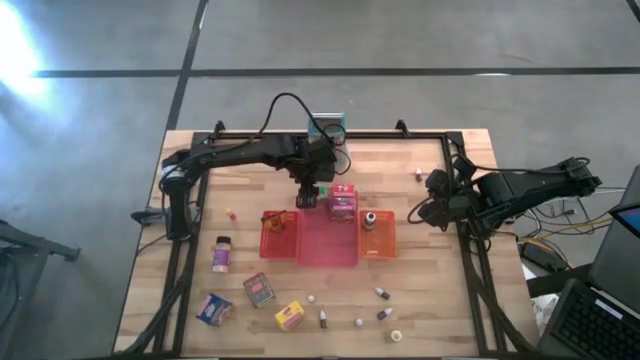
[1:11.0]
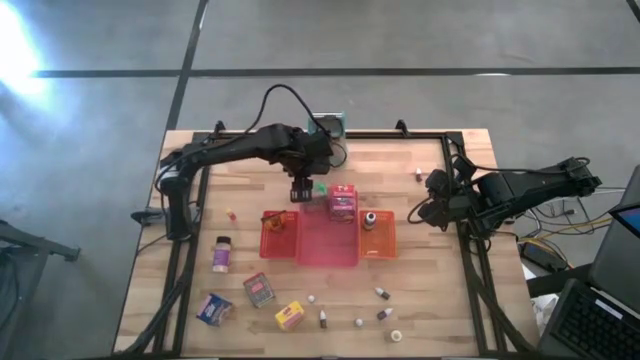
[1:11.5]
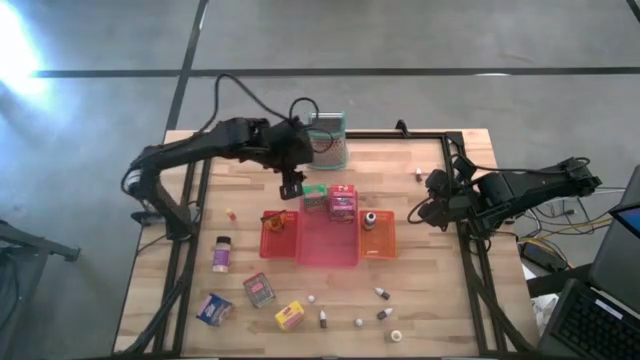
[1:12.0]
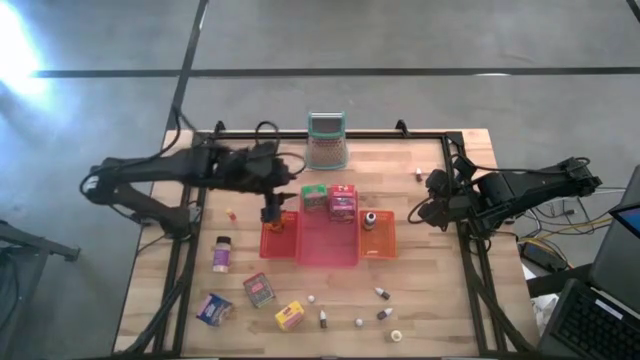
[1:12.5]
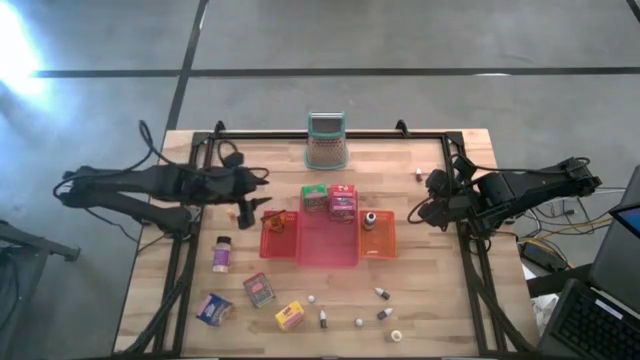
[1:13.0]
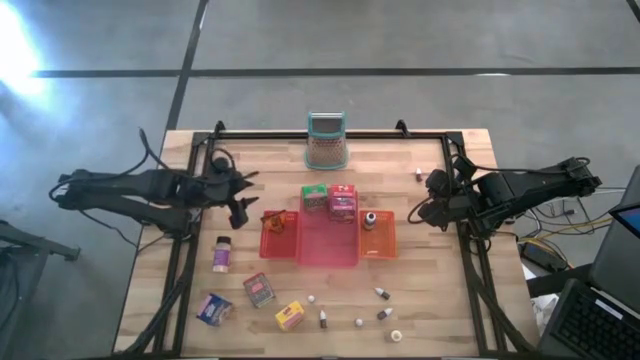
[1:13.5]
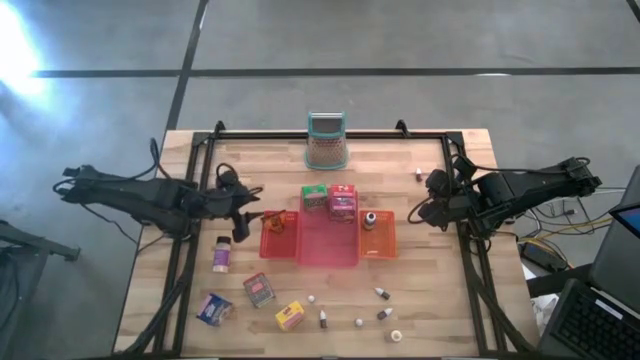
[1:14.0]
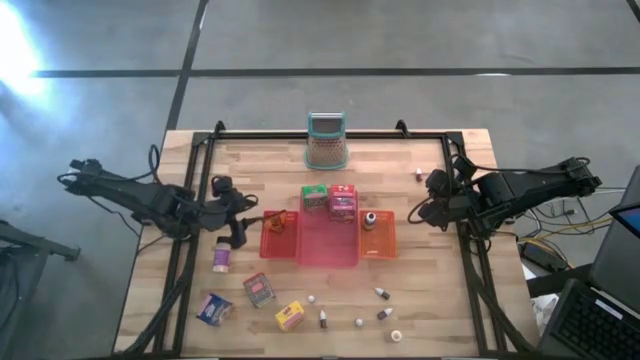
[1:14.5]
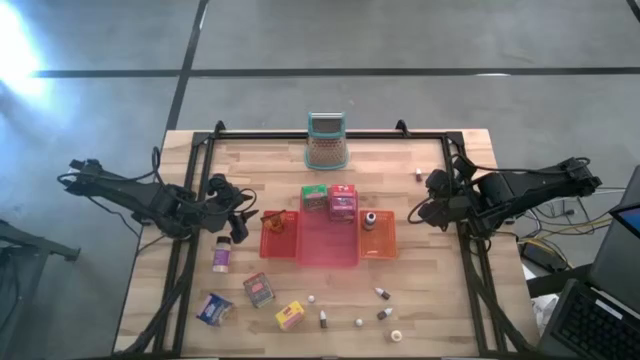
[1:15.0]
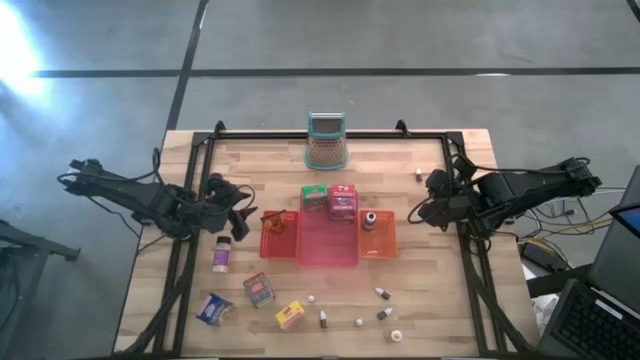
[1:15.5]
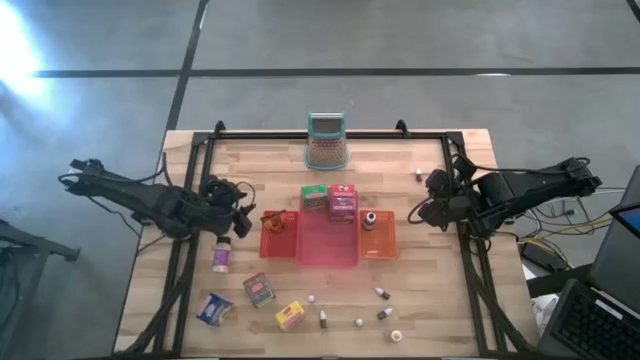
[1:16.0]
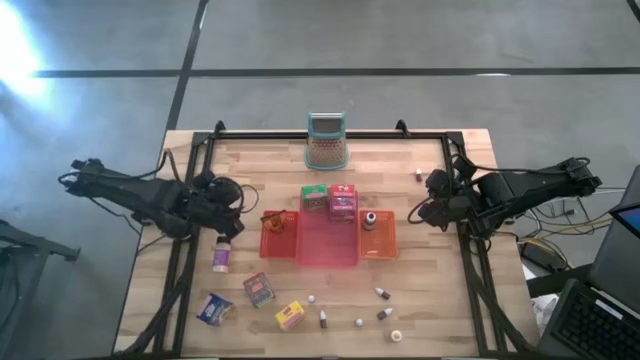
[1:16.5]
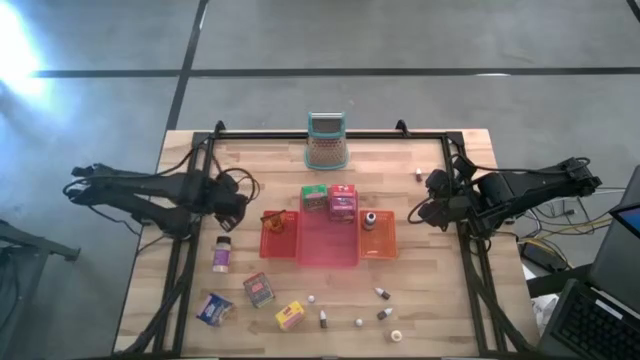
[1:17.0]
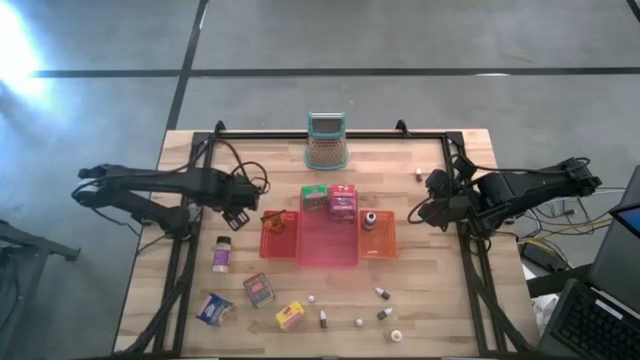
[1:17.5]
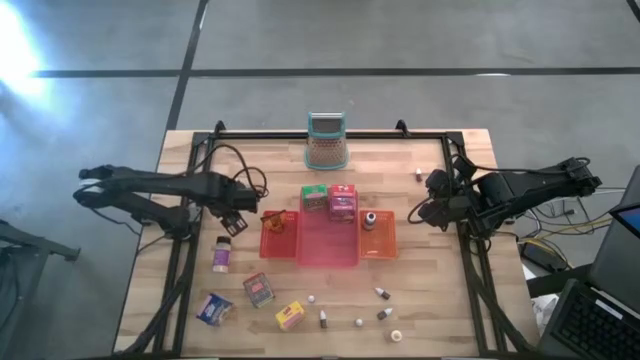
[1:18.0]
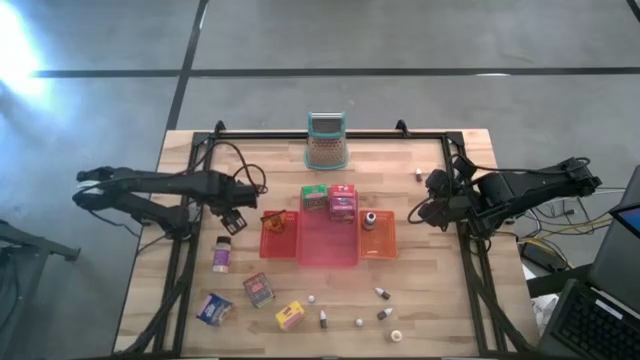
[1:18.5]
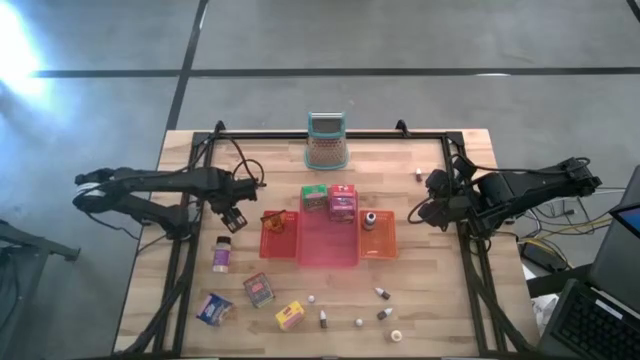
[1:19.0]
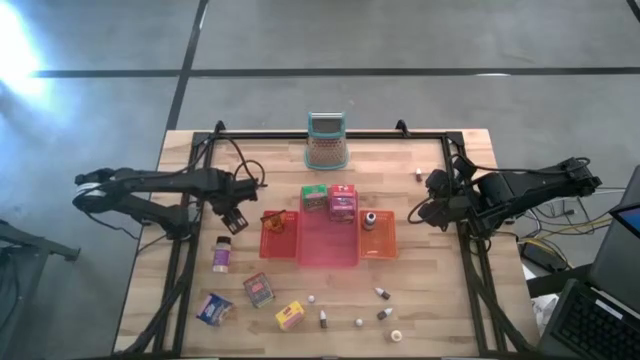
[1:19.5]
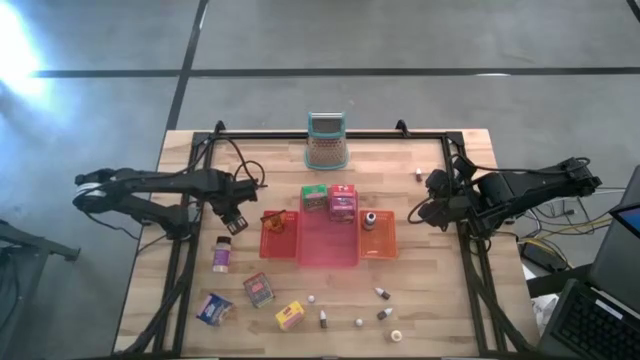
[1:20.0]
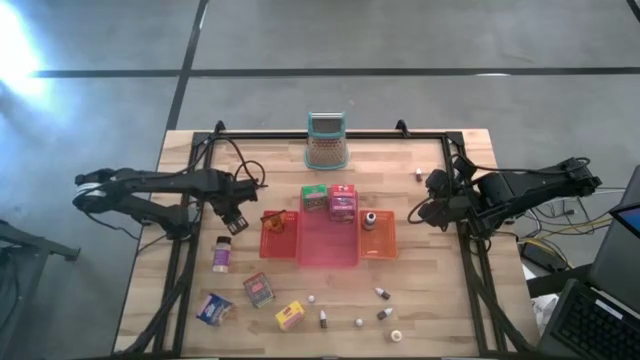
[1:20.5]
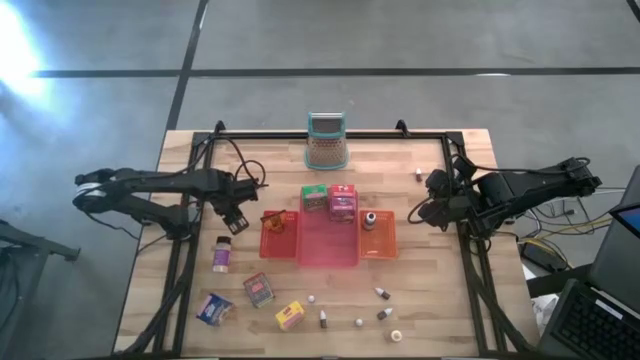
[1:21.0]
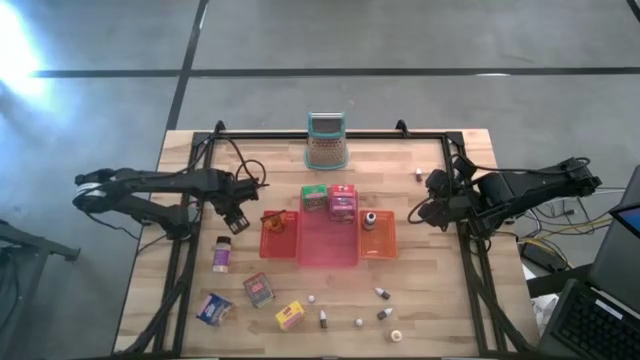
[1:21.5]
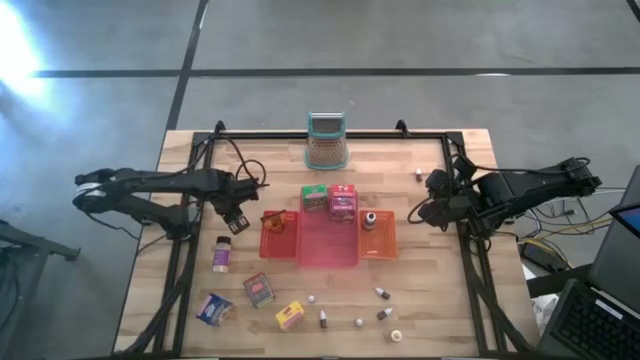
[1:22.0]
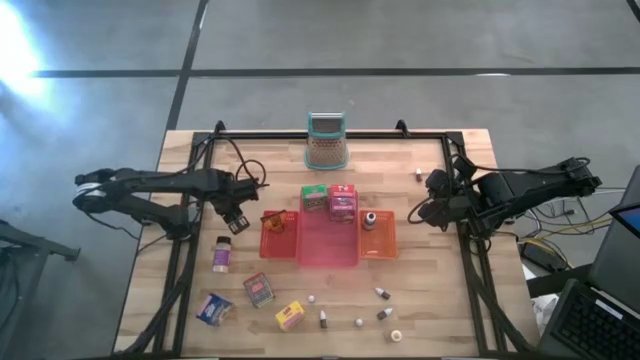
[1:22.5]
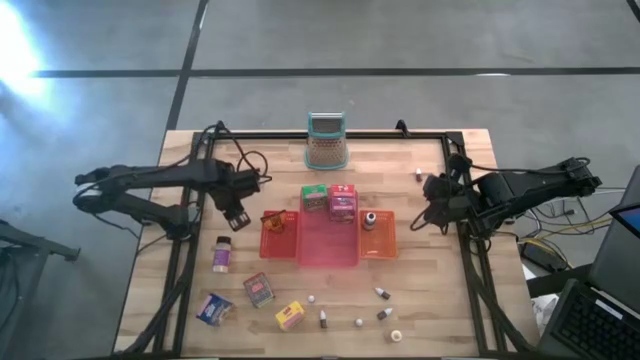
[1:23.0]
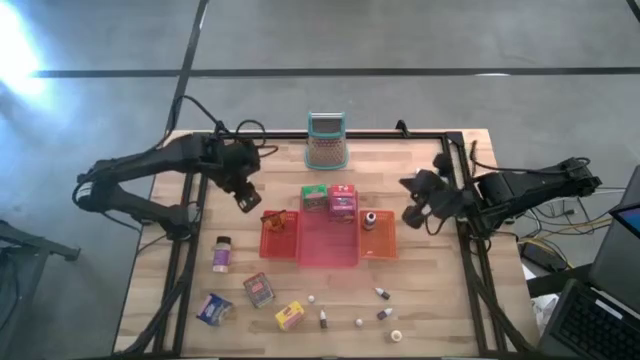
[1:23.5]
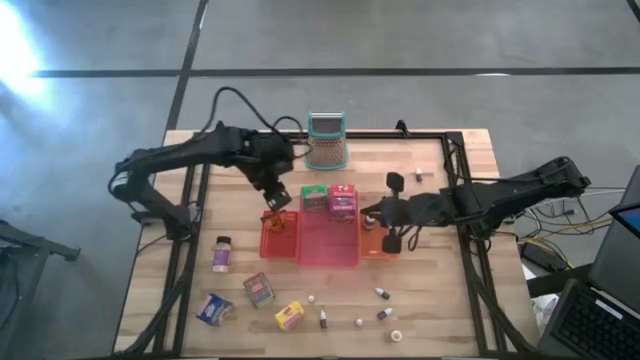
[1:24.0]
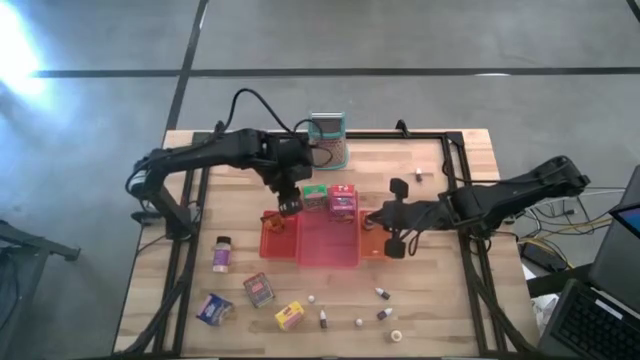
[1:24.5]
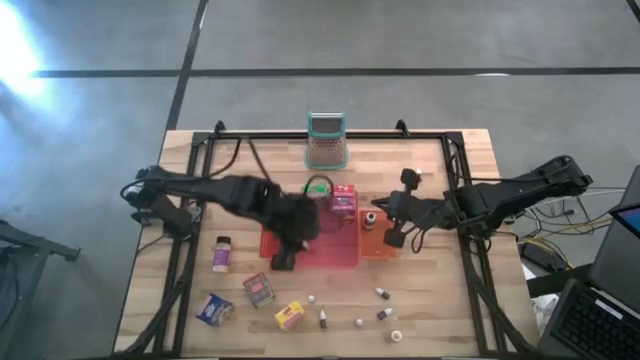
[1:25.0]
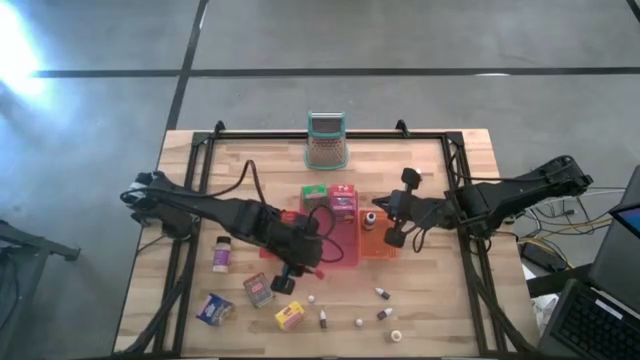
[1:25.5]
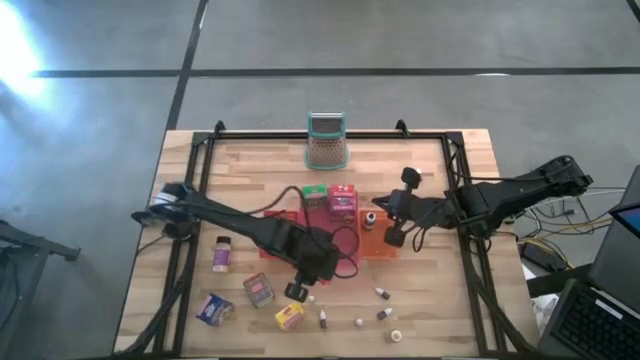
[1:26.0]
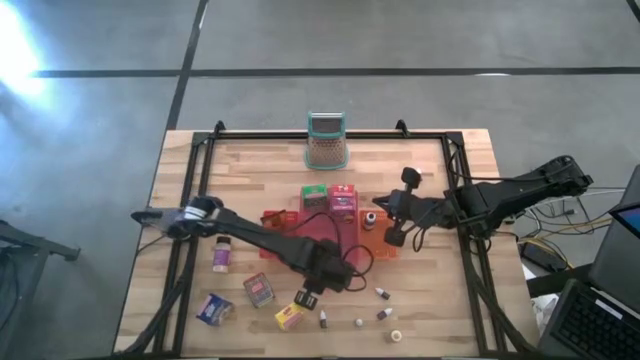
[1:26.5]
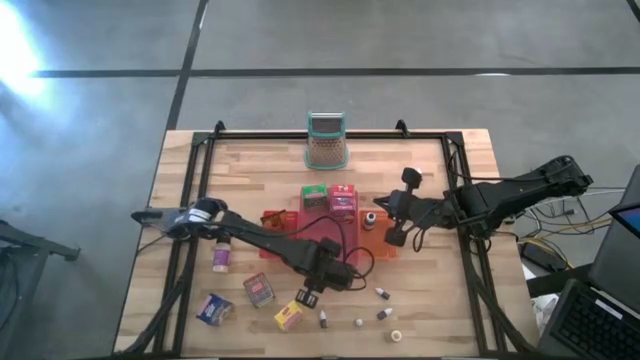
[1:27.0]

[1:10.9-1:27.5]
Task: Pick & Place Kitchen Items
Move the transparent food coloring bottle to the center of the table

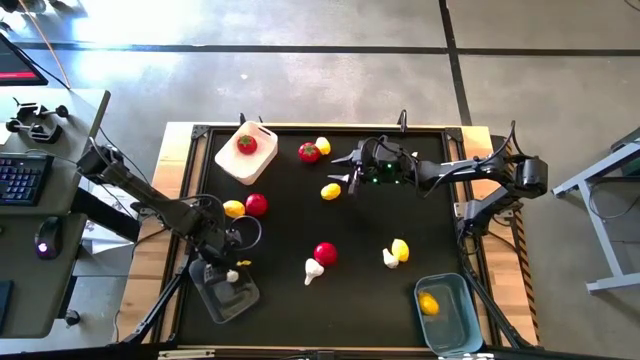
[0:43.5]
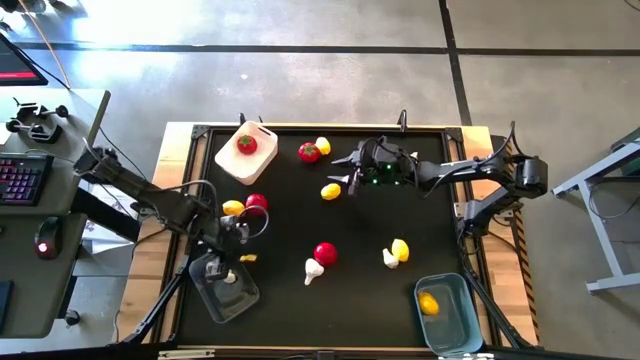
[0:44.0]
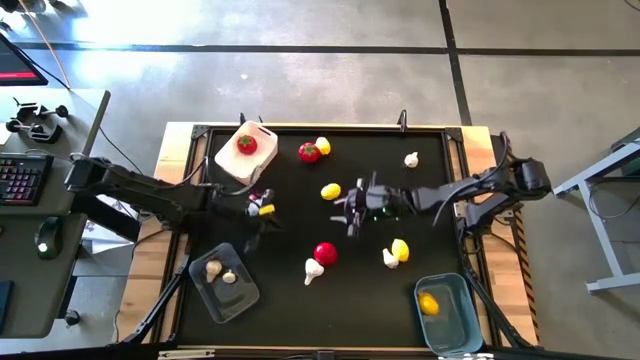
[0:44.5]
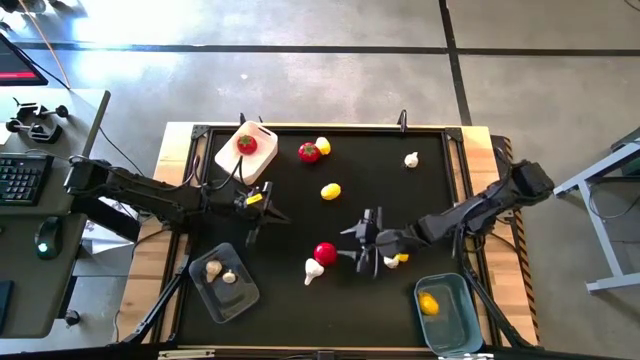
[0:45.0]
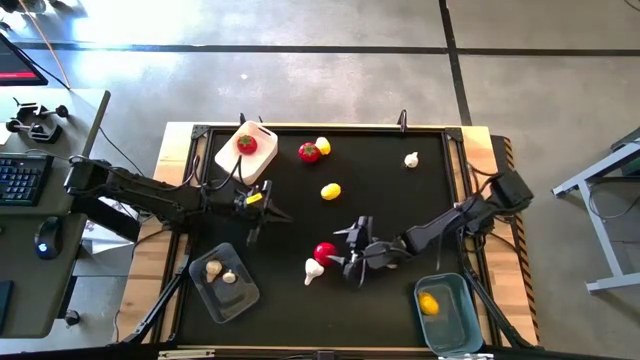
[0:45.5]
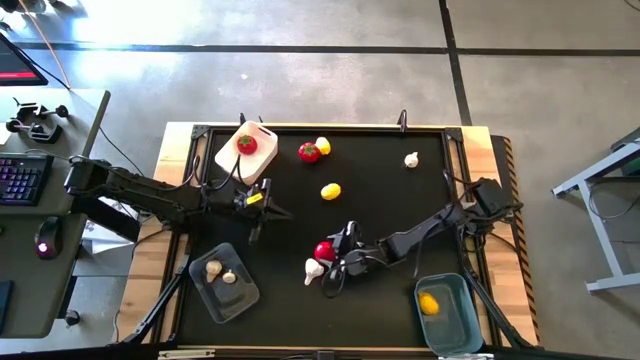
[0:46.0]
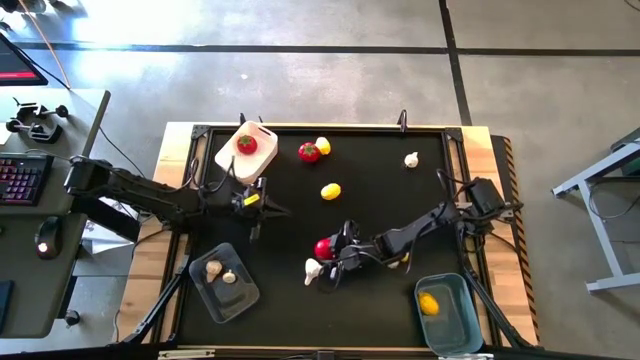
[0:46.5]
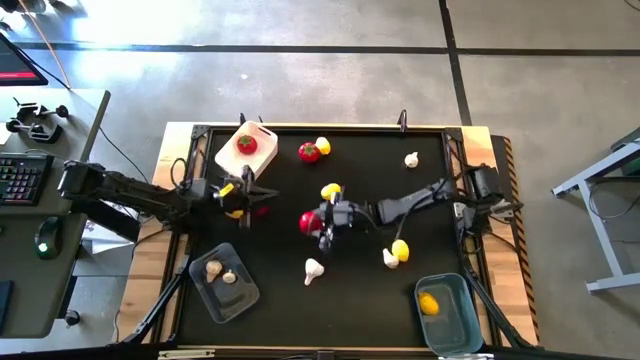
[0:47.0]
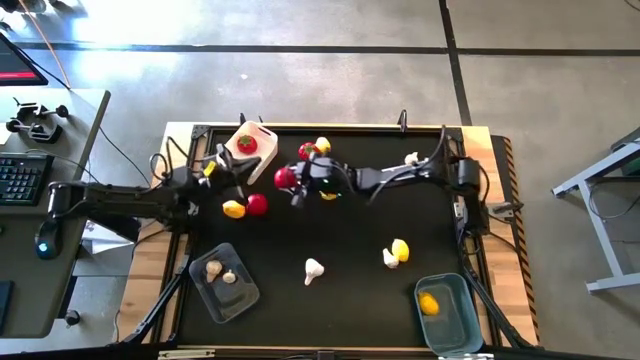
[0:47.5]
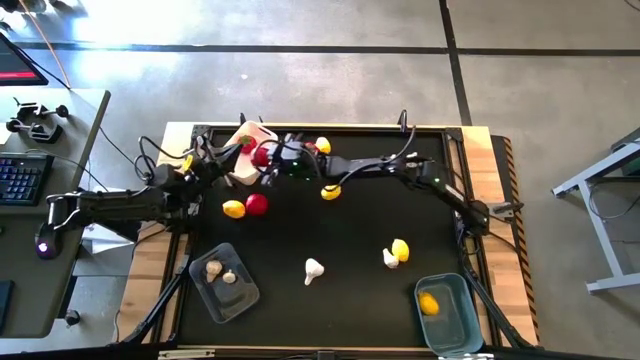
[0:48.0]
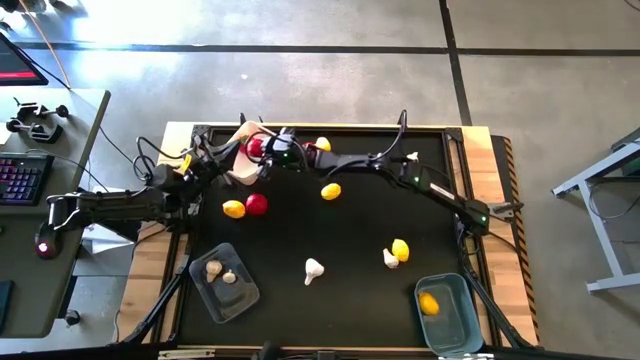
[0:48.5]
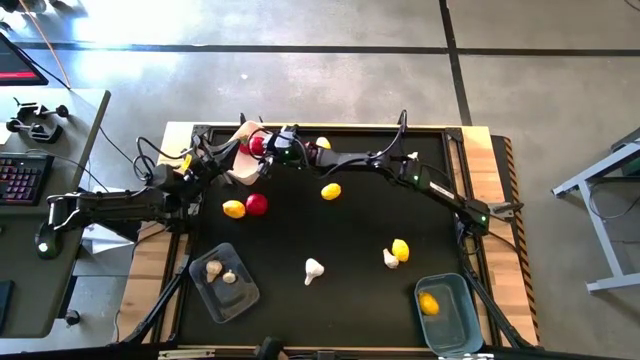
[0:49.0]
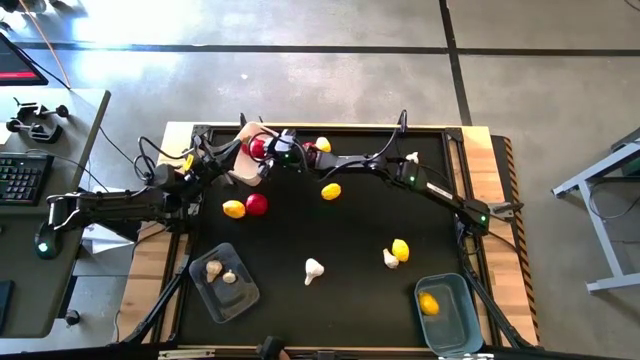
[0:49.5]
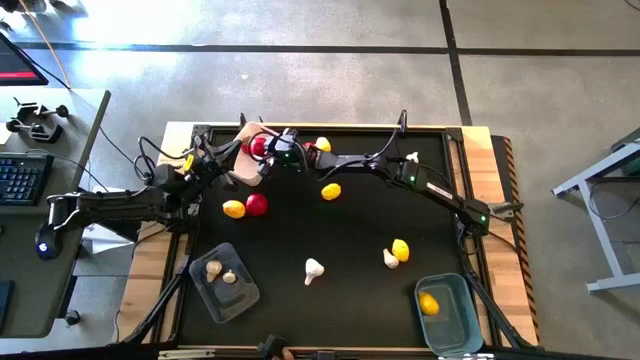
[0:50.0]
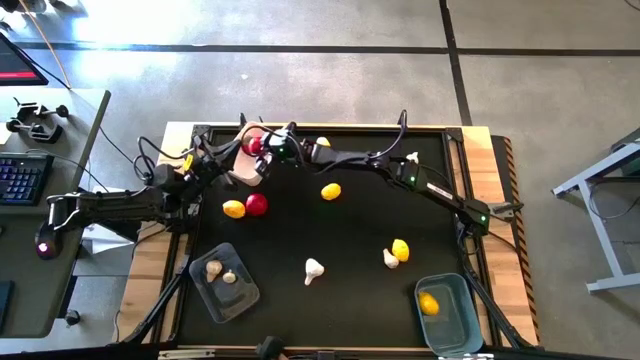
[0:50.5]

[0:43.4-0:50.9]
Task: Sort produce into baskets
Put the red tomato into the white bin
